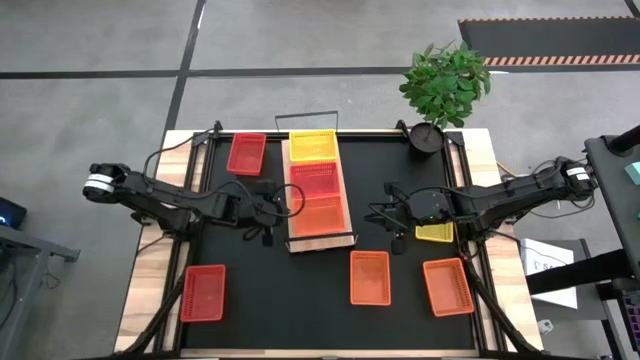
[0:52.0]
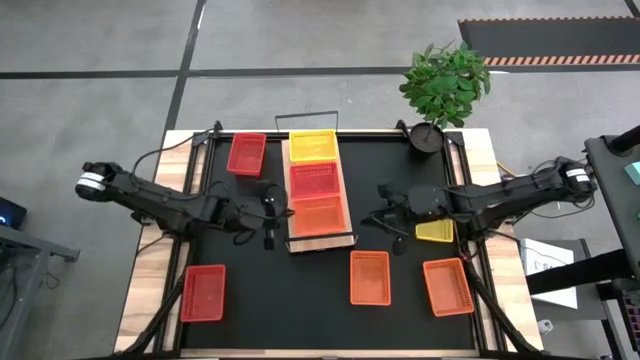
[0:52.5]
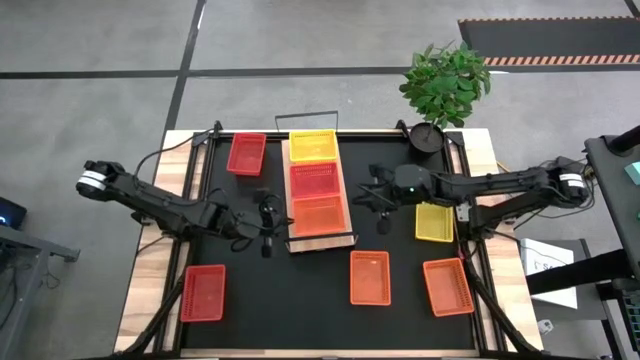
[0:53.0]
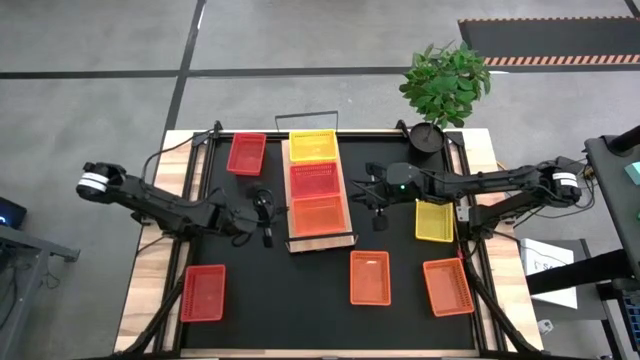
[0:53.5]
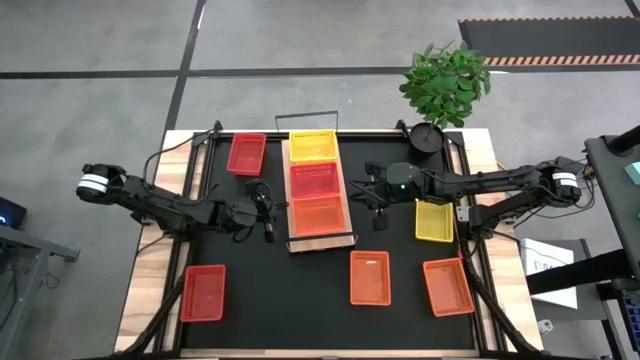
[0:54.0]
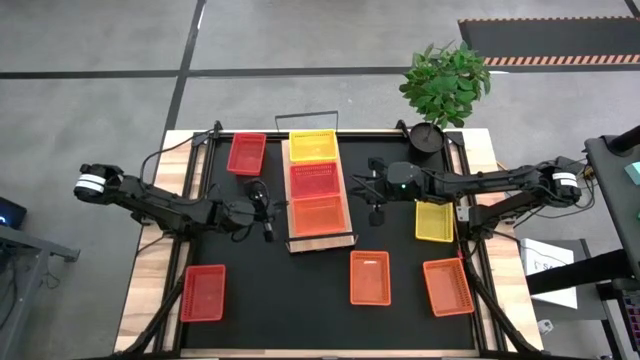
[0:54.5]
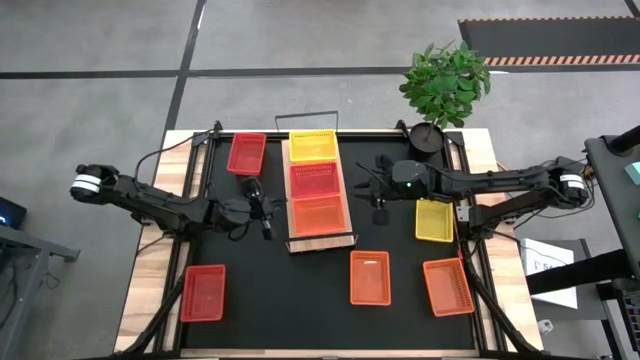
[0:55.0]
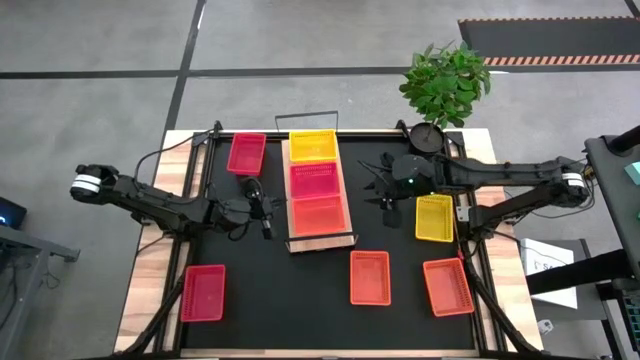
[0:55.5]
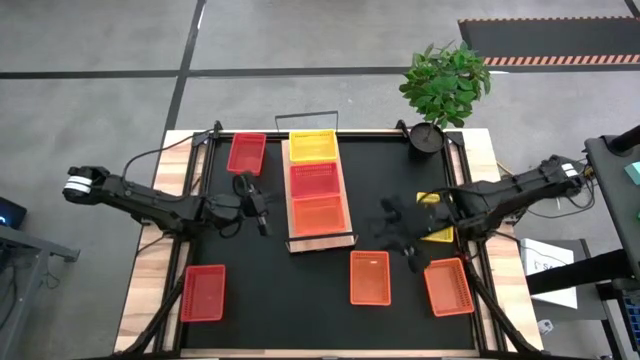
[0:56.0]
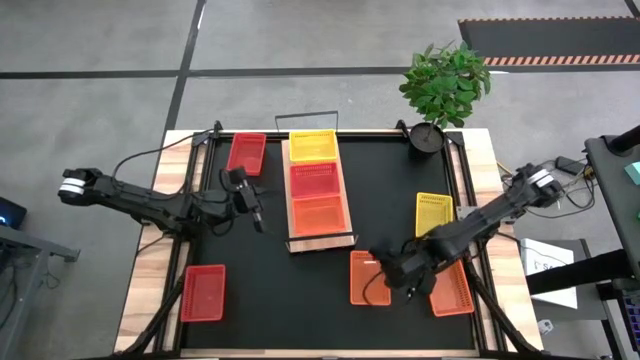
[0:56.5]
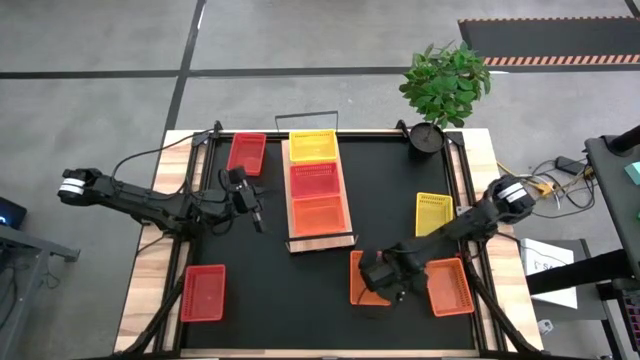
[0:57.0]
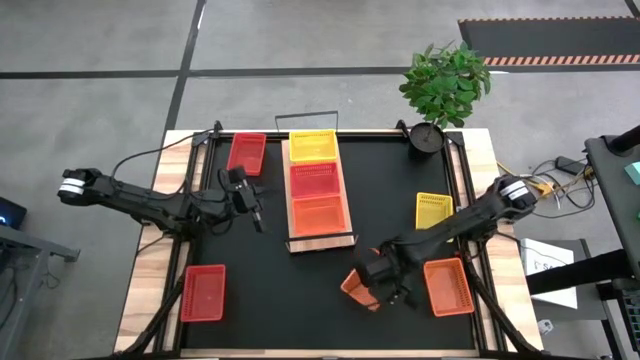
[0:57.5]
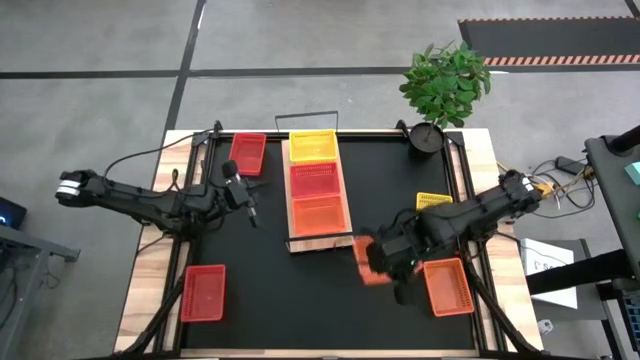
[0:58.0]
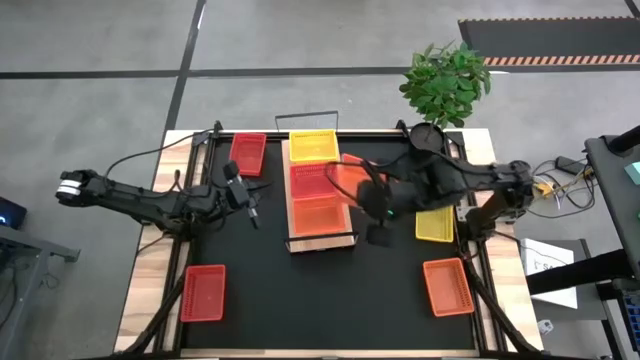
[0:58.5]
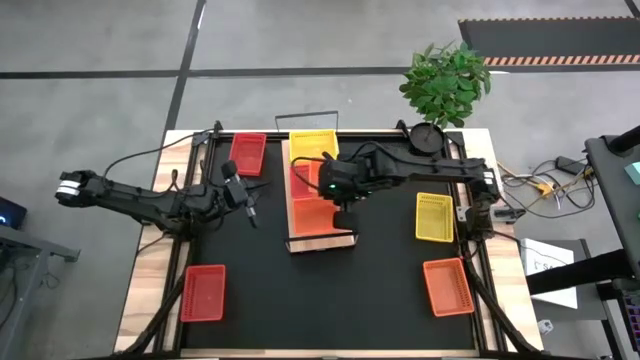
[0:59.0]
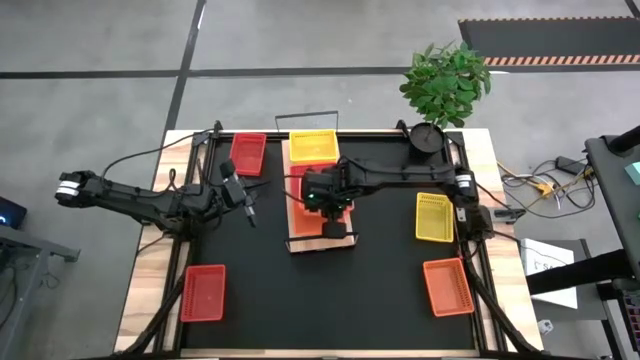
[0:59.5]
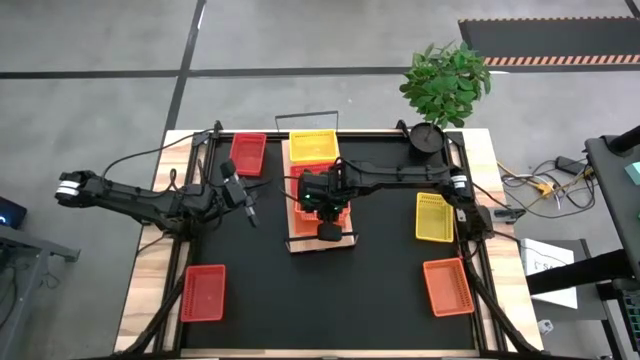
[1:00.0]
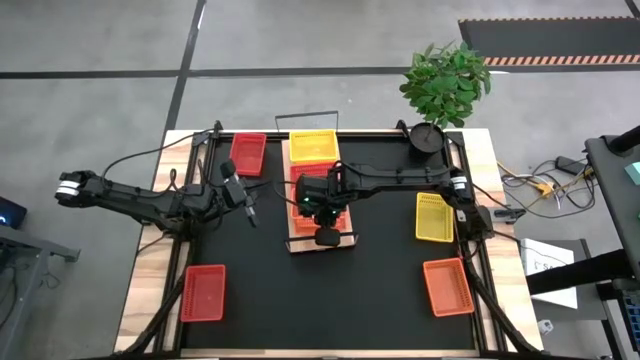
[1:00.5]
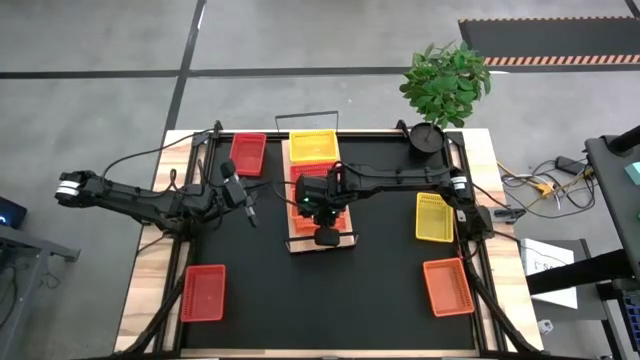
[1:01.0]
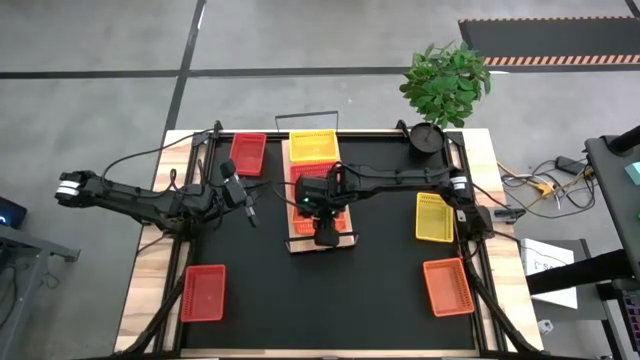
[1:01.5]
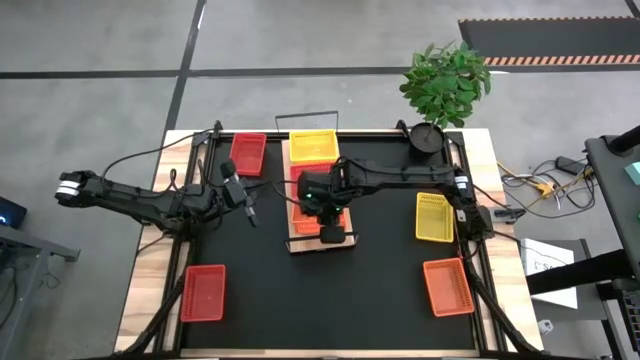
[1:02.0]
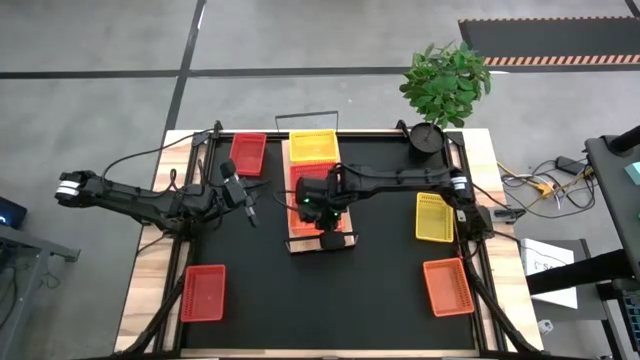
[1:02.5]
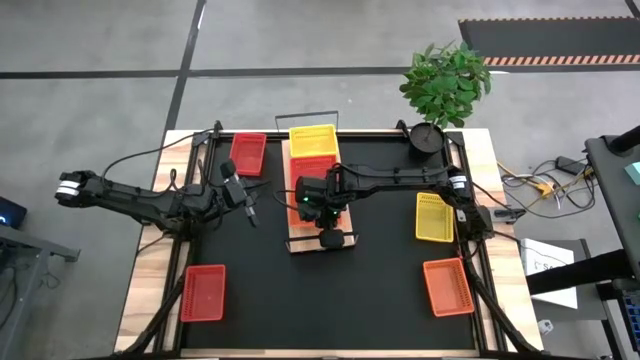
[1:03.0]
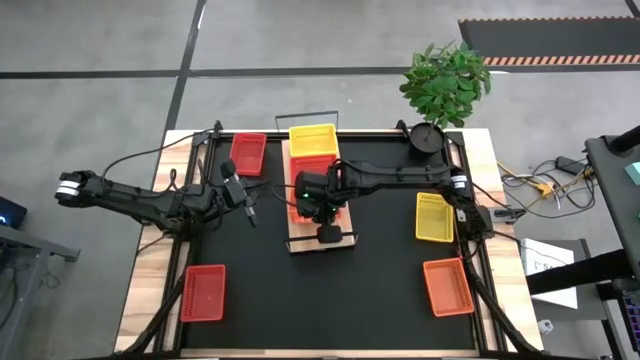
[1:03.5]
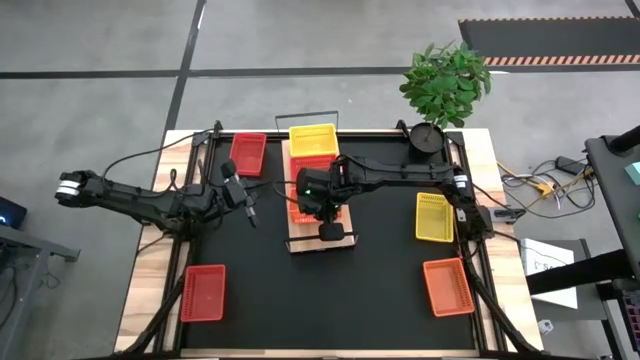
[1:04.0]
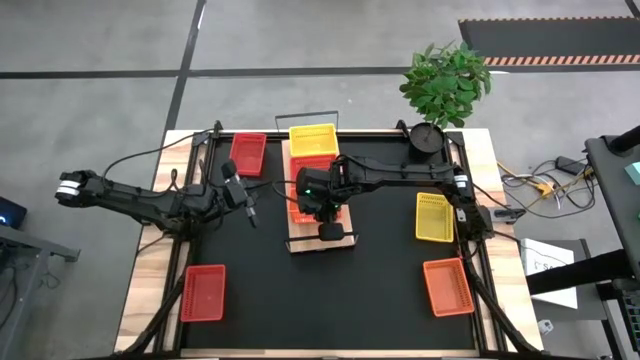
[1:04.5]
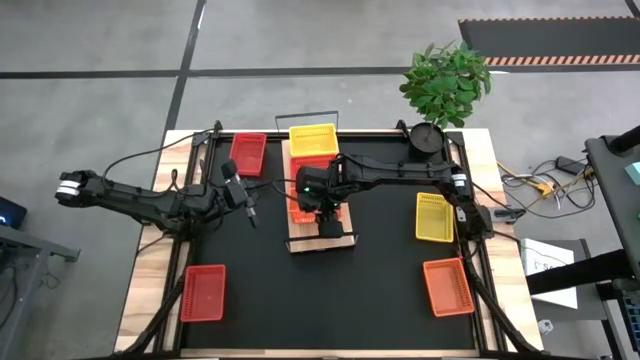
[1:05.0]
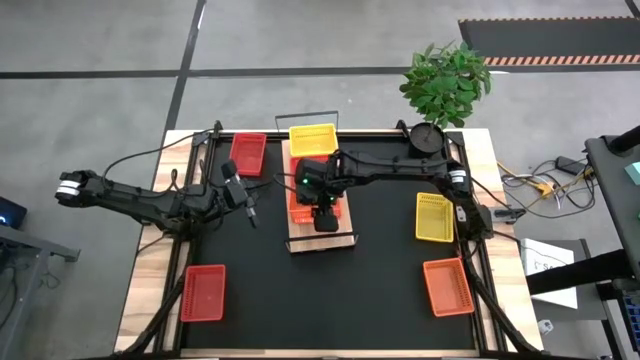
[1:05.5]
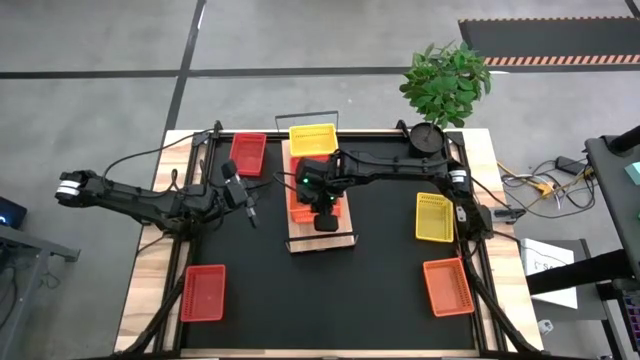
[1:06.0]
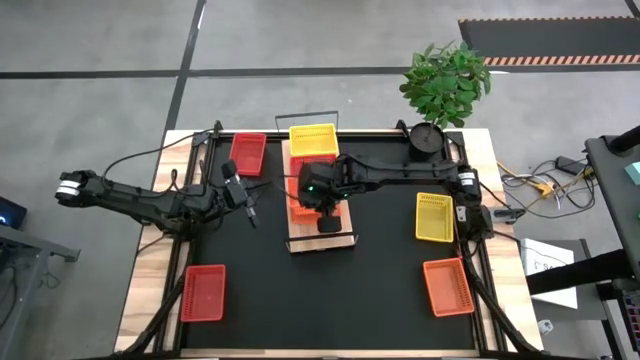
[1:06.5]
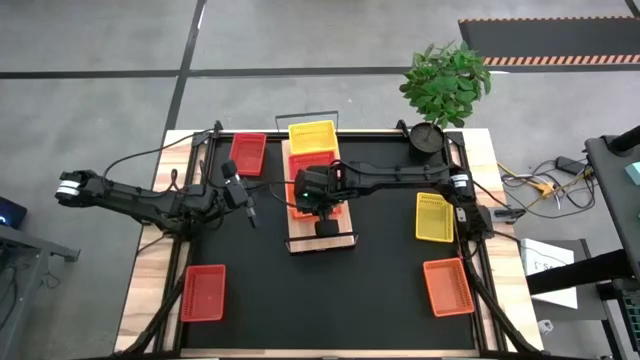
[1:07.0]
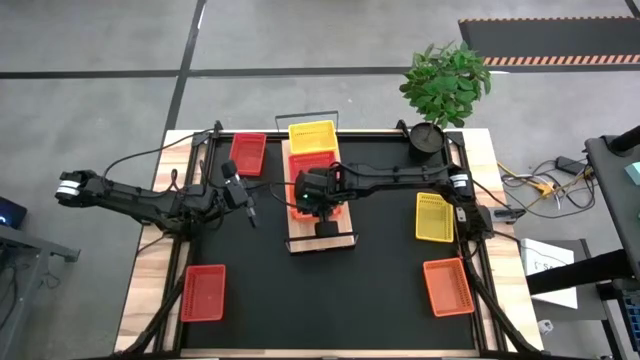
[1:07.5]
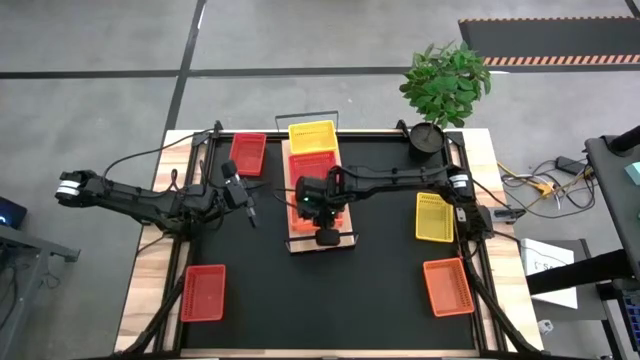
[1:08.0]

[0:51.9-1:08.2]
Task: Stack baskets on shelf by color
Stack the left orange bin on top of the orange bin on the shelf

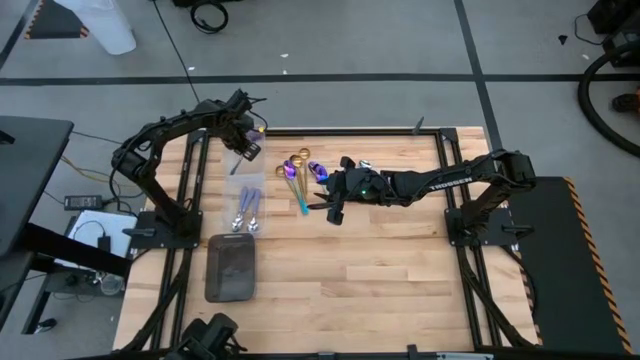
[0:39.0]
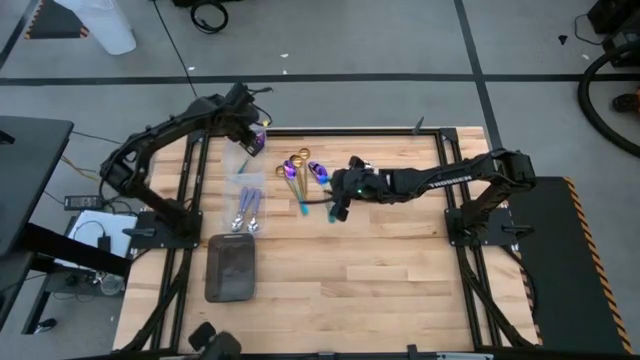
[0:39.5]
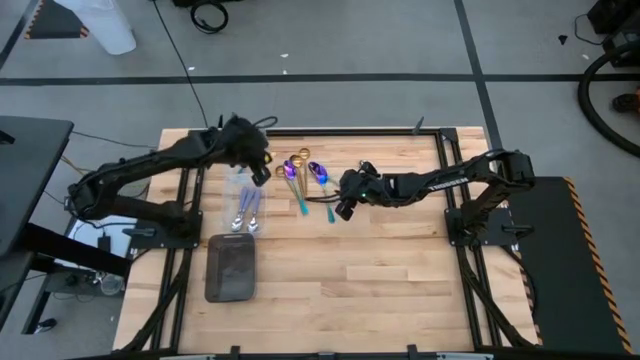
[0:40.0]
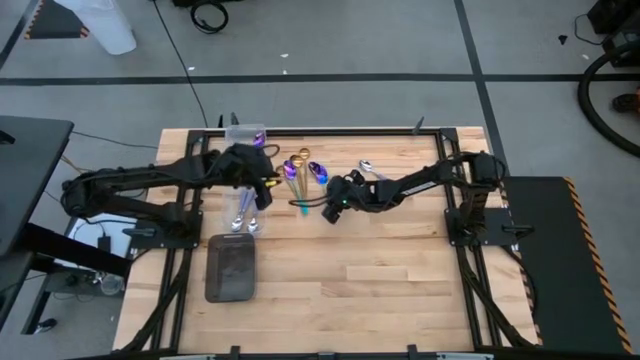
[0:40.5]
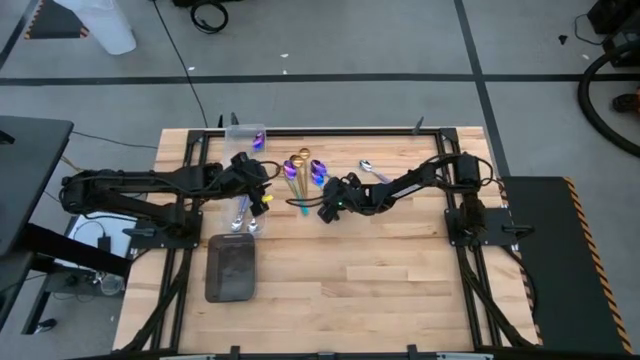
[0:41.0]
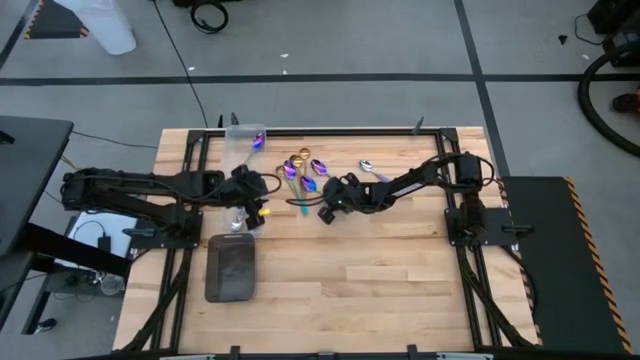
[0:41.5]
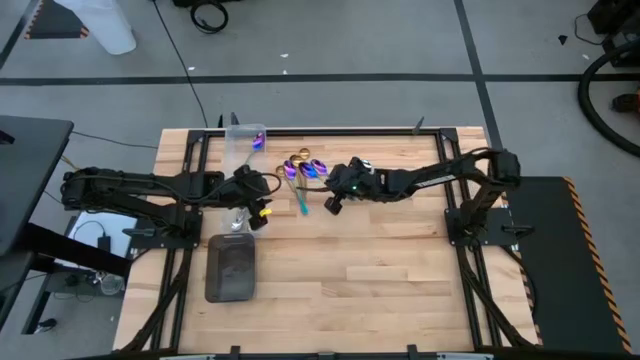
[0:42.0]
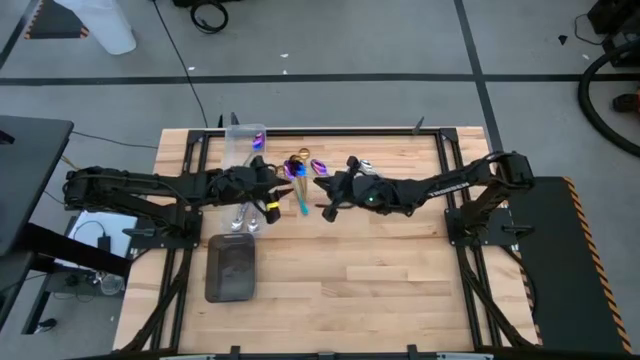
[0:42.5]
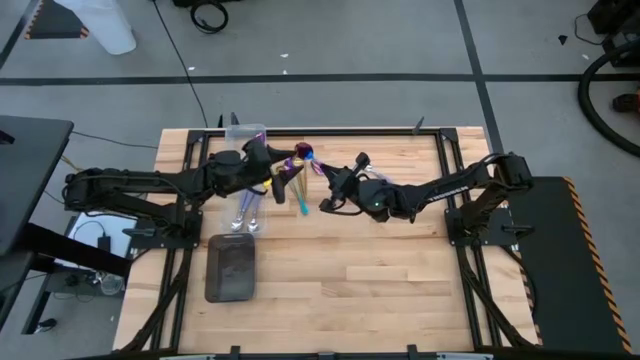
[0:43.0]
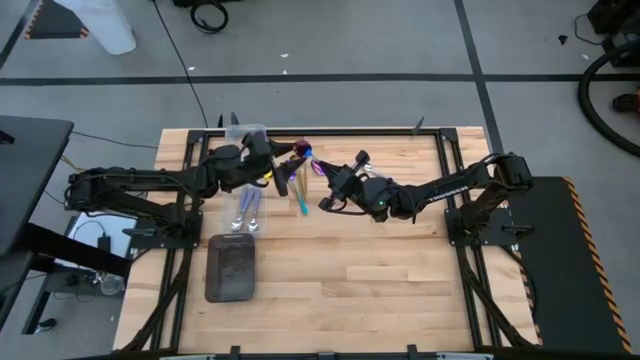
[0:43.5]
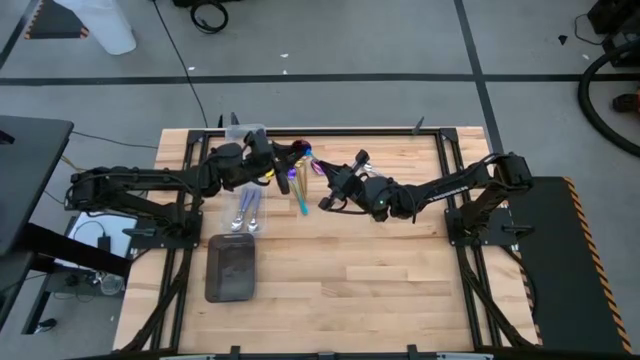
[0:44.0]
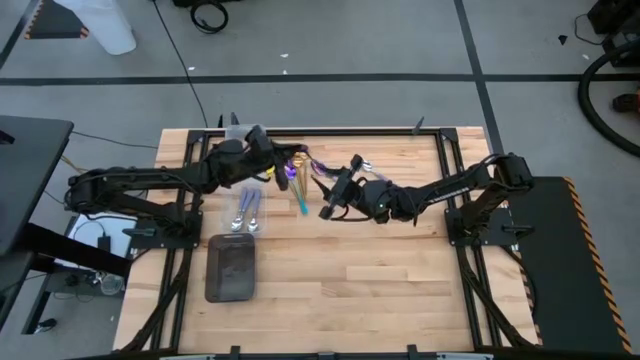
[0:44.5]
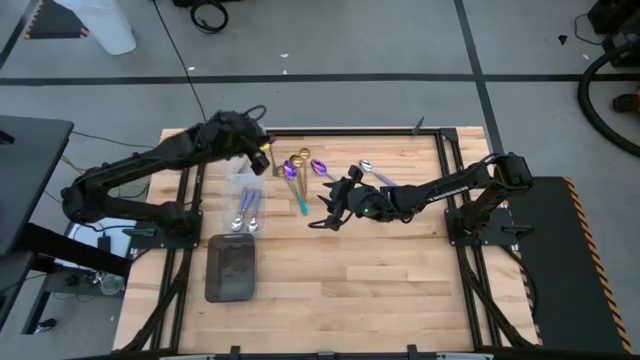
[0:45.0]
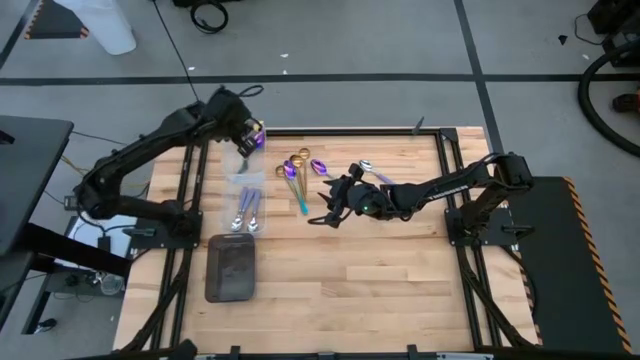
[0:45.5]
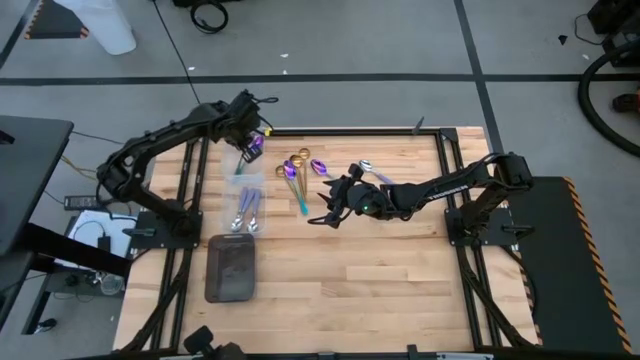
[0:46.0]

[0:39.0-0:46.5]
Task: Sort silverware by color (type)
Put the purple spoon into the top transparent bin
